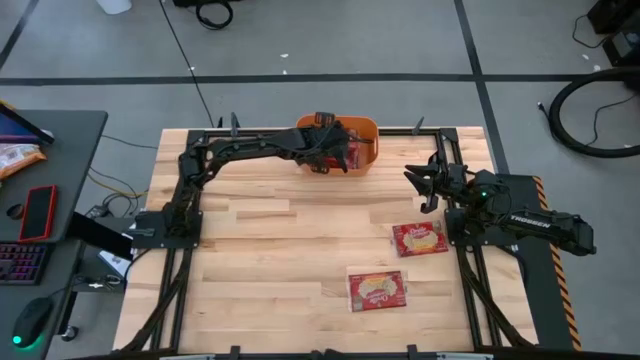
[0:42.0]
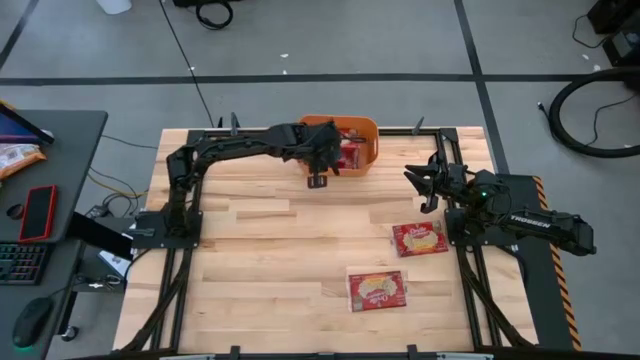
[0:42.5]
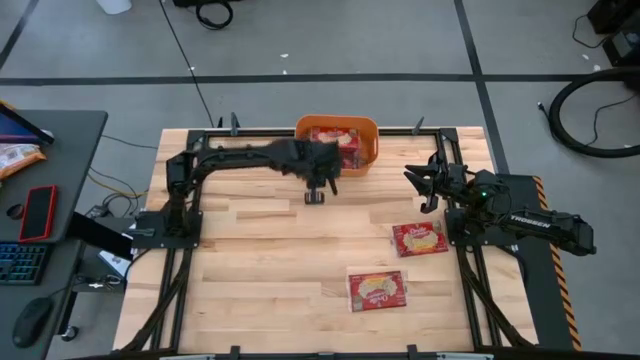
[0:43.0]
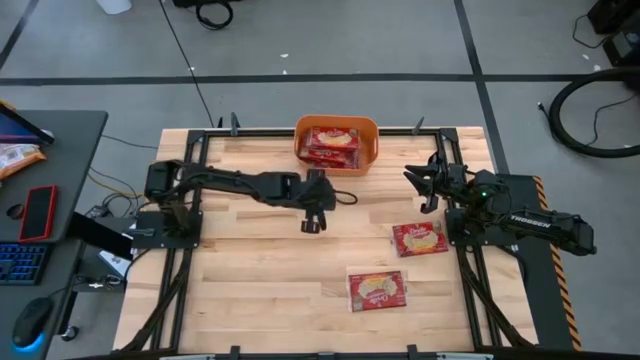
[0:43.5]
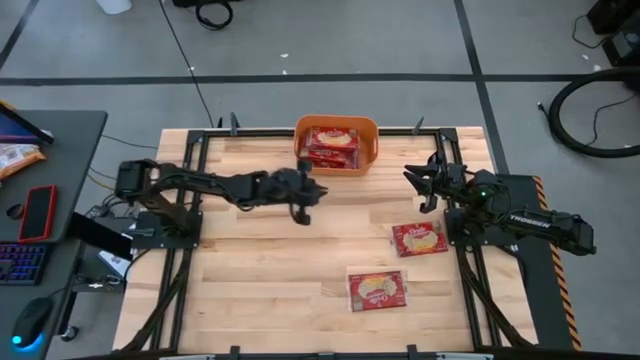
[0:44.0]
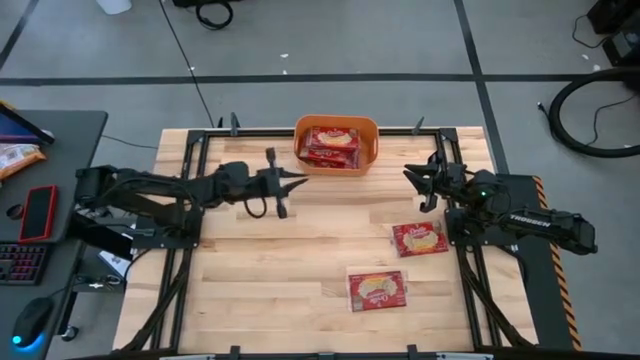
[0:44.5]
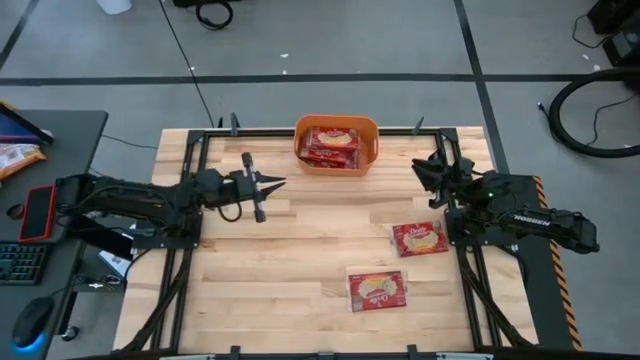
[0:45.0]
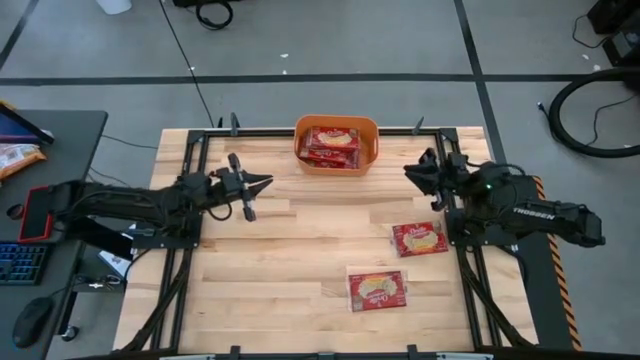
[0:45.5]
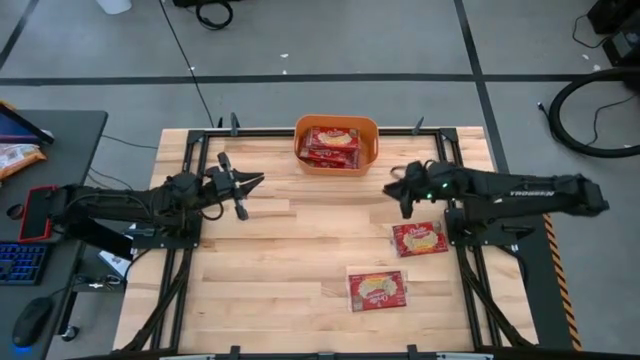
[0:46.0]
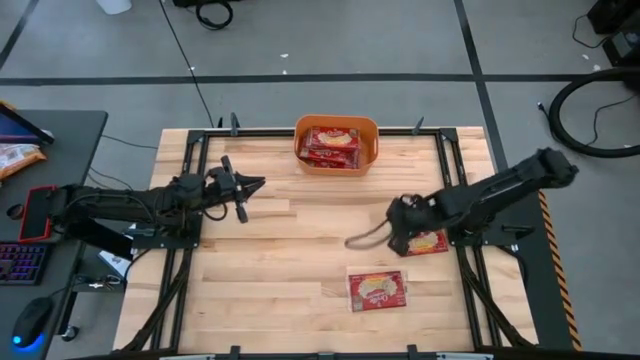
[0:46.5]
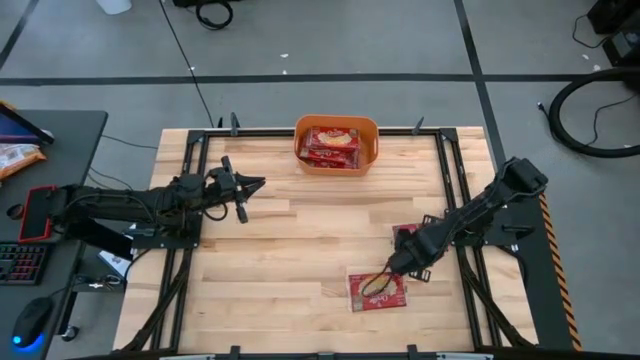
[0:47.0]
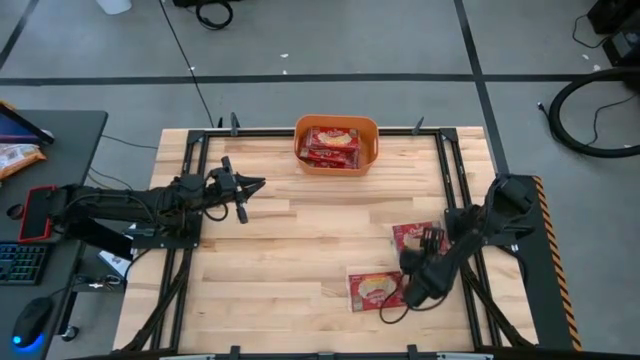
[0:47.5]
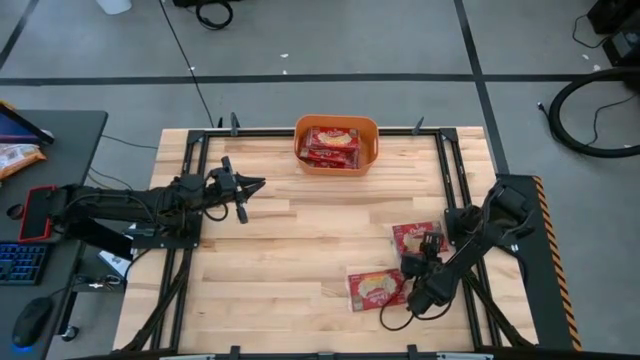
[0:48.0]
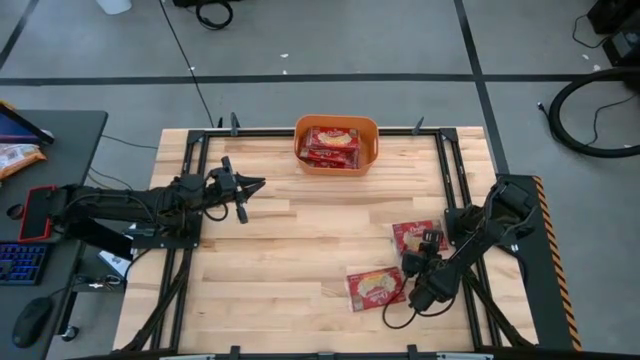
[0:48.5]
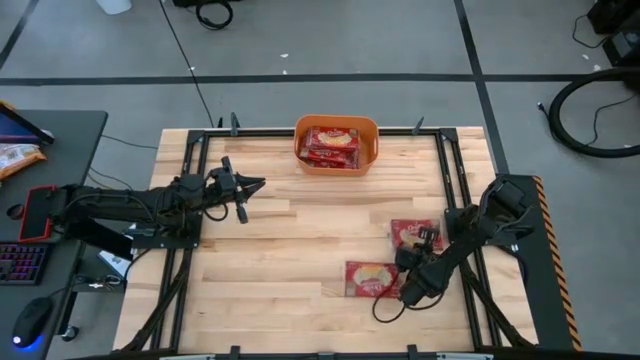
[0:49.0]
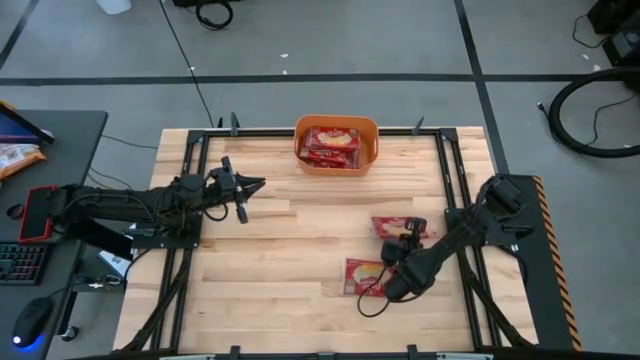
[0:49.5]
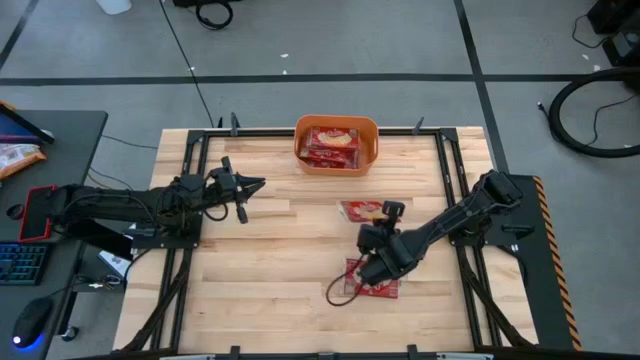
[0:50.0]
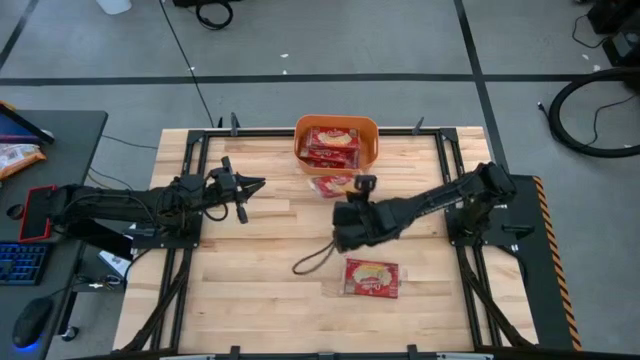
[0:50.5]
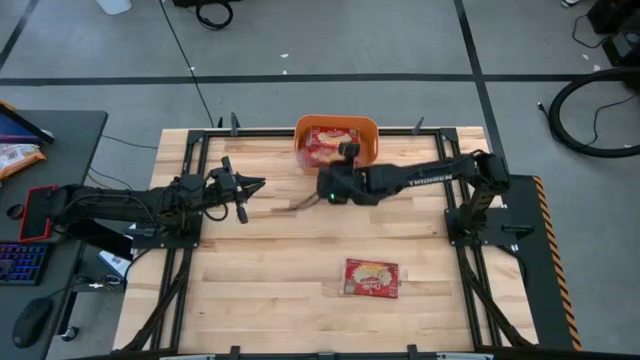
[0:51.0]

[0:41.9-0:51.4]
Task: Sort popcorn bags into baskets
Put the red popcorn bag into the orange bin

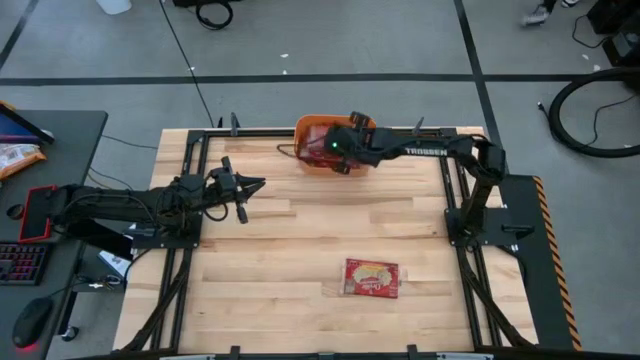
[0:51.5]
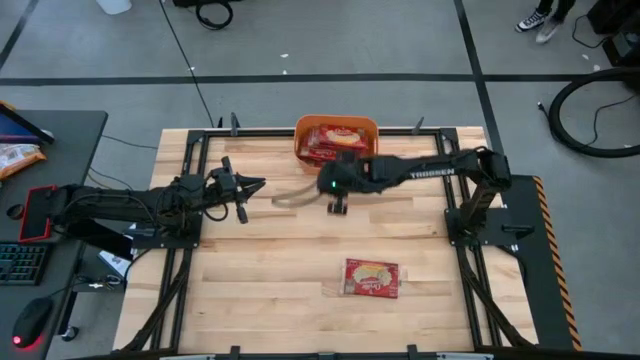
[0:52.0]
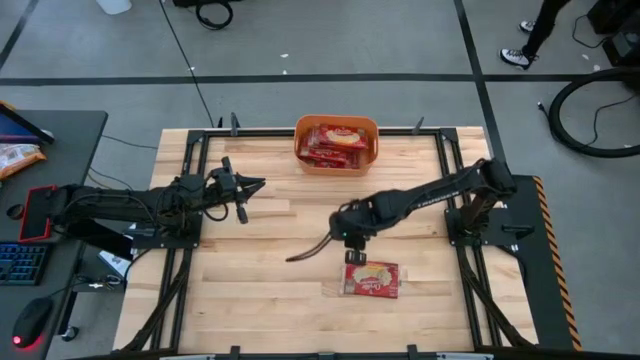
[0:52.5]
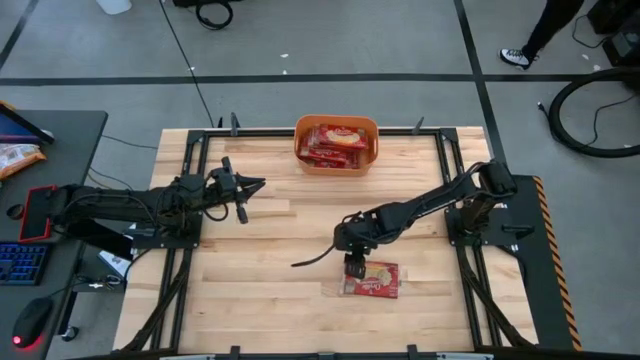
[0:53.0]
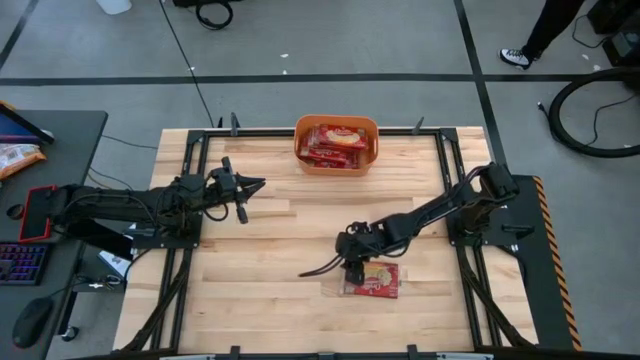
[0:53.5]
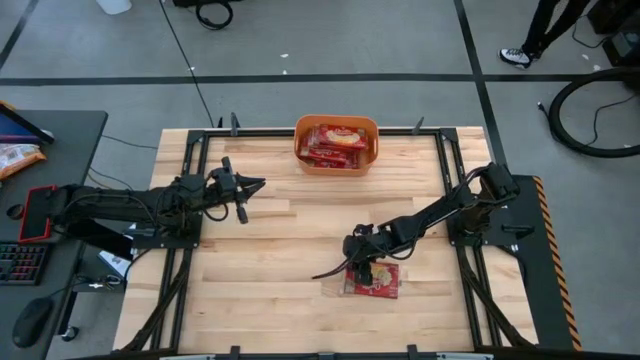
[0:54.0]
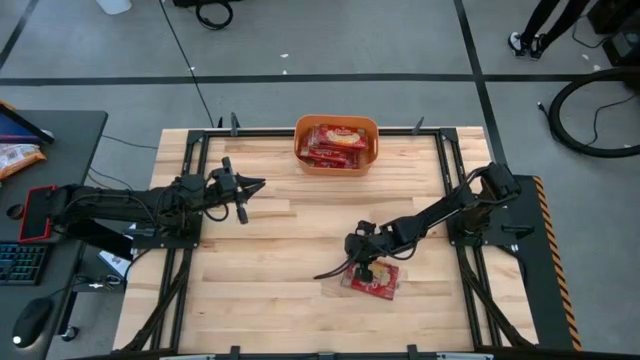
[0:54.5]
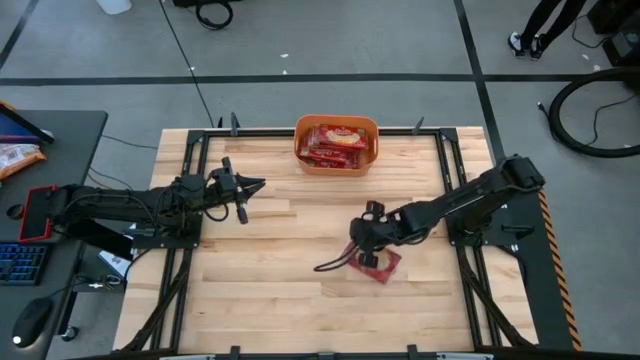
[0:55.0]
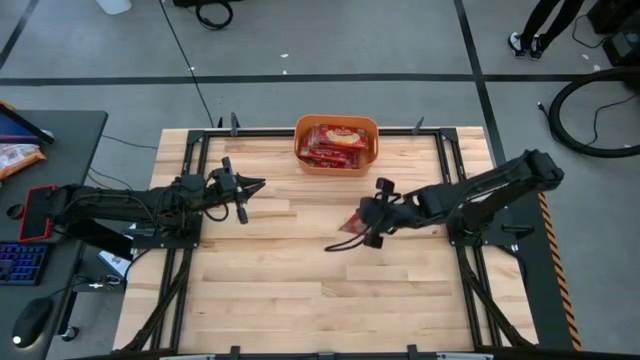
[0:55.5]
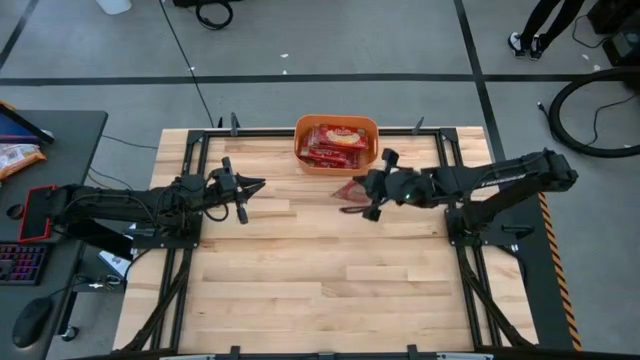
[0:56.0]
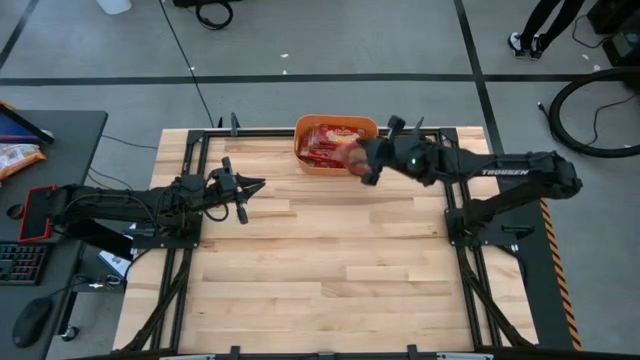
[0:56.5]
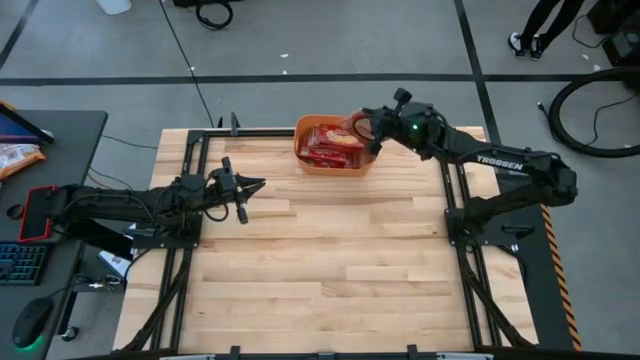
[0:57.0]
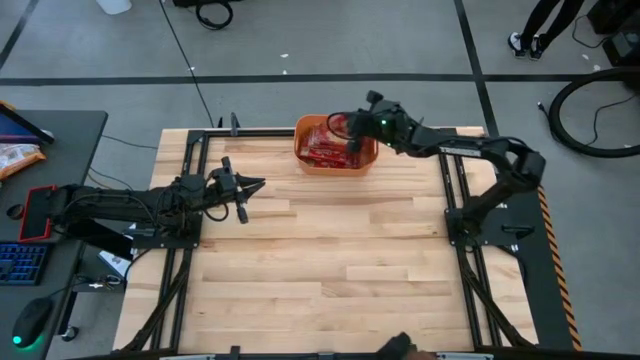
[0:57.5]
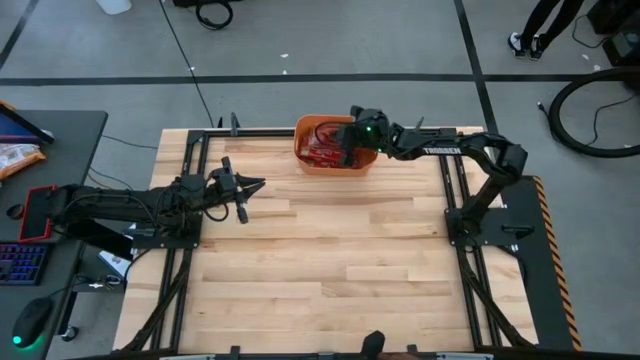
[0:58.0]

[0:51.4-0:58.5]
Put the red popcorn bag into the orange bin

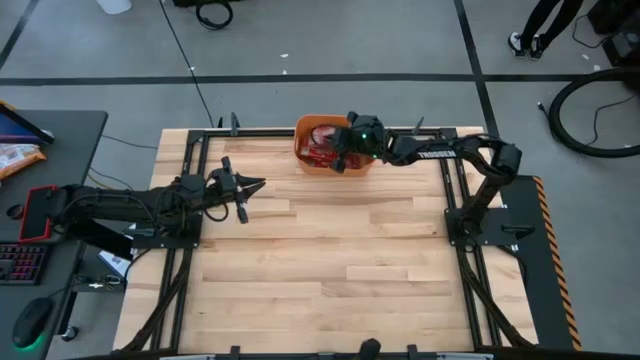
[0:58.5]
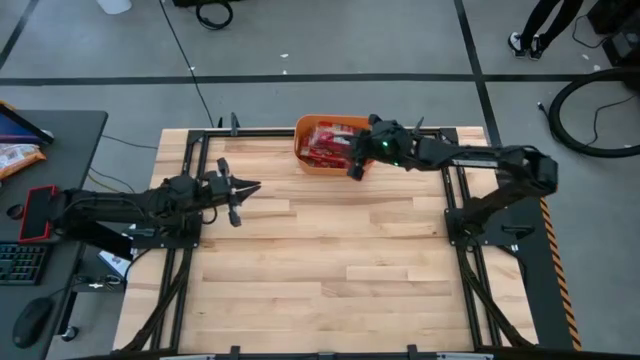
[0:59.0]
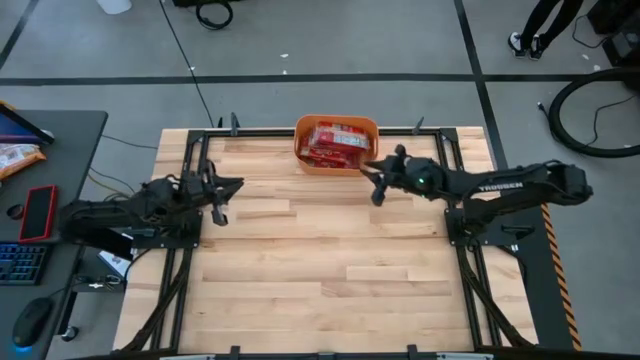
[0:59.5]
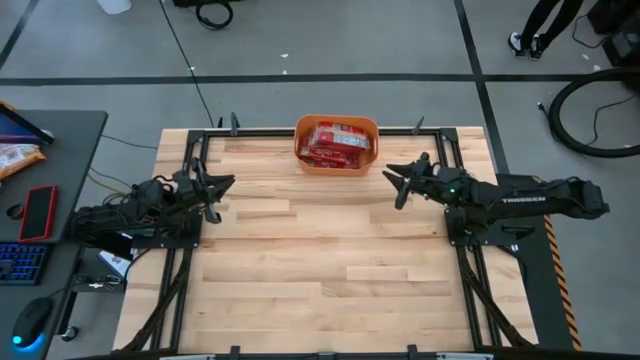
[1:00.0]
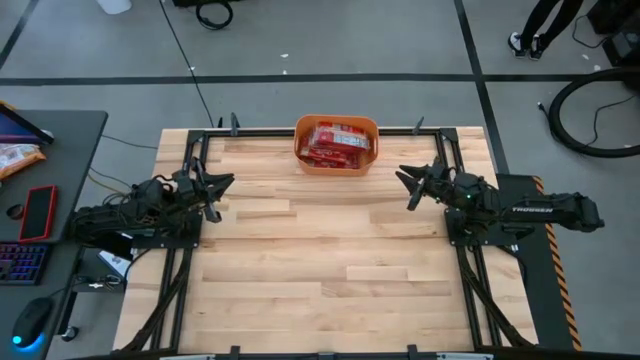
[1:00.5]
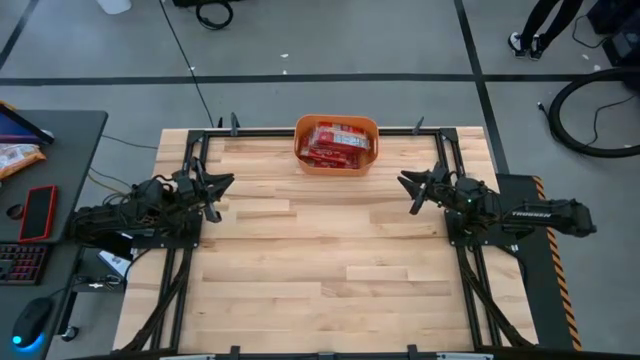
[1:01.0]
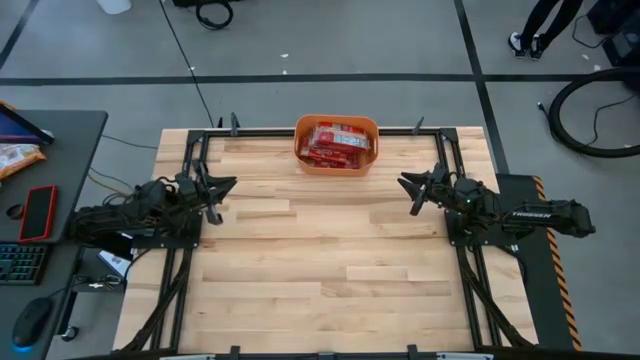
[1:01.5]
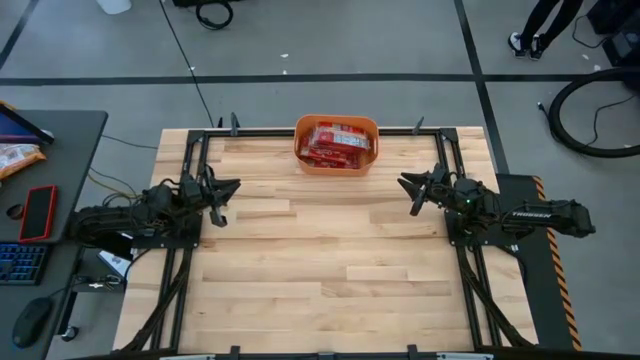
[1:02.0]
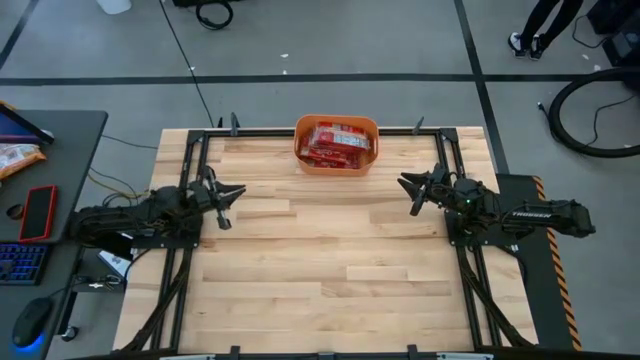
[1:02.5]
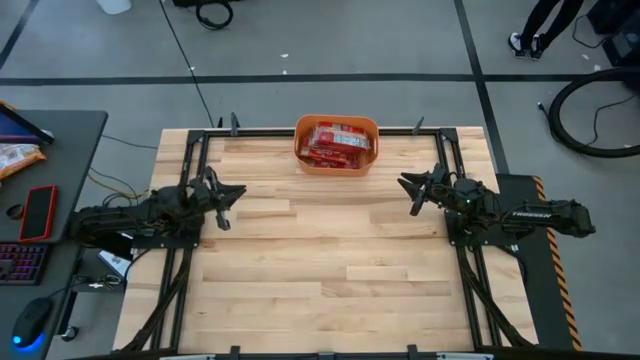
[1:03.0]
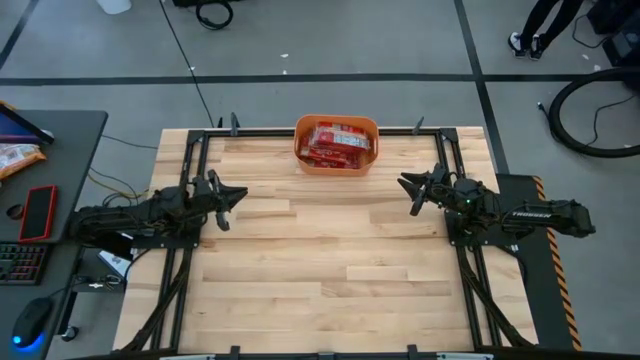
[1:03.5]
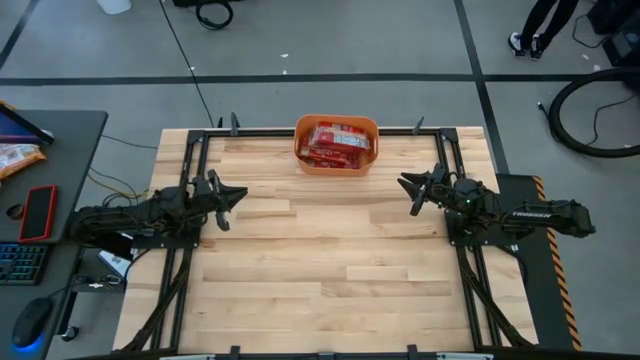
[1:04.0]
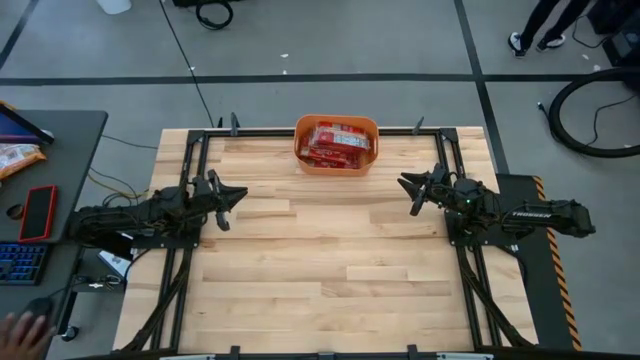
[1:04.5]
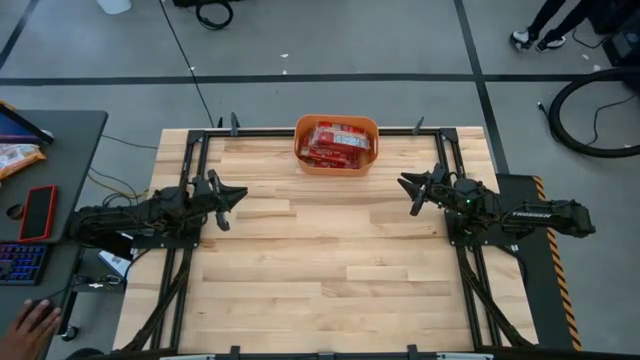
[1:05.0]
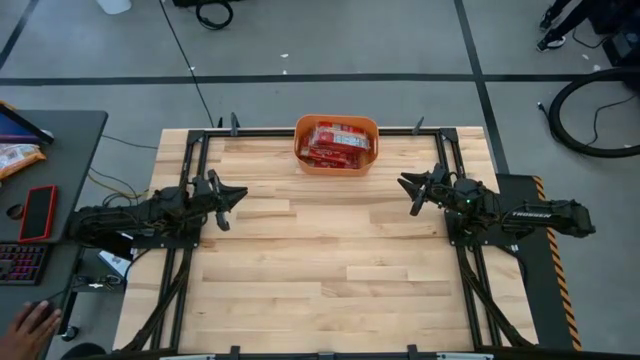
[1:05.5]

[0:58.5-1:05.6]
Return to Home Position
